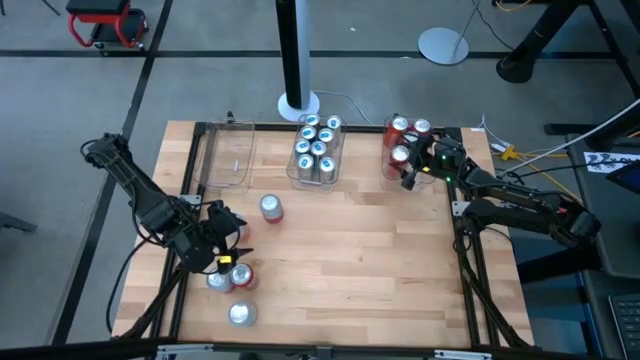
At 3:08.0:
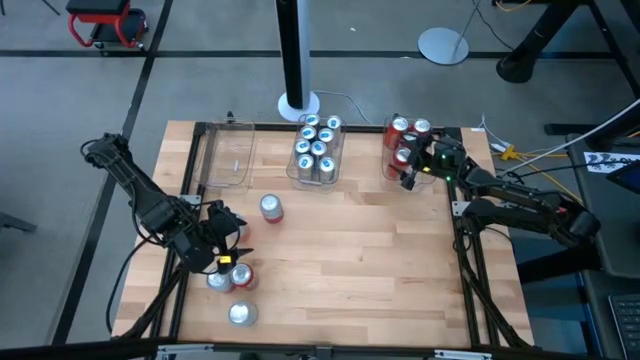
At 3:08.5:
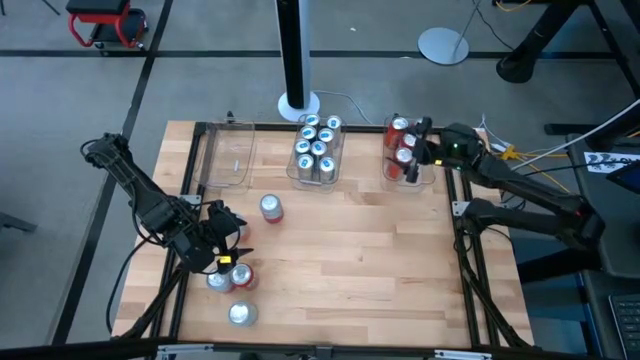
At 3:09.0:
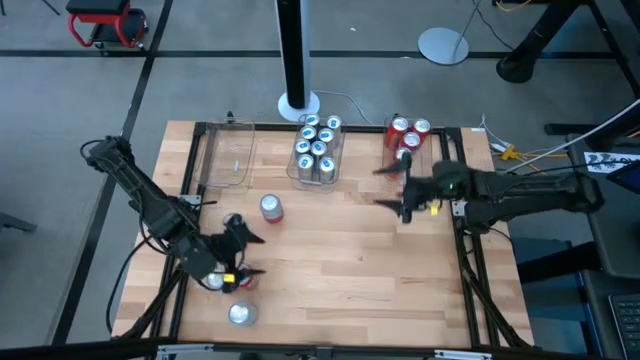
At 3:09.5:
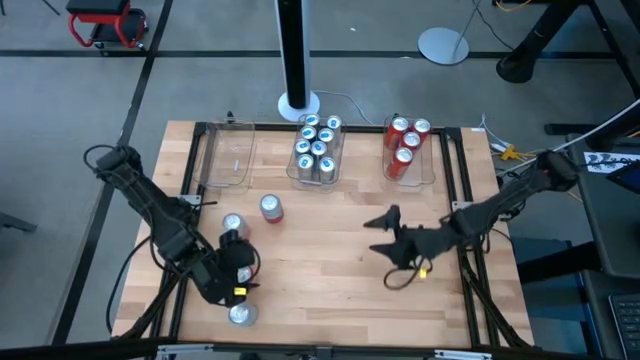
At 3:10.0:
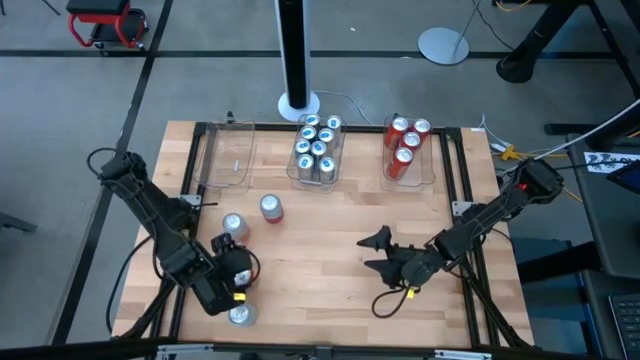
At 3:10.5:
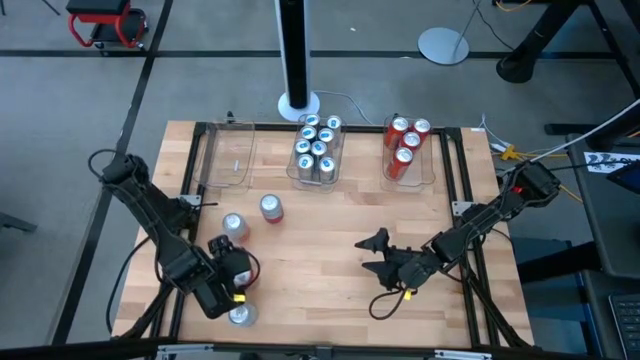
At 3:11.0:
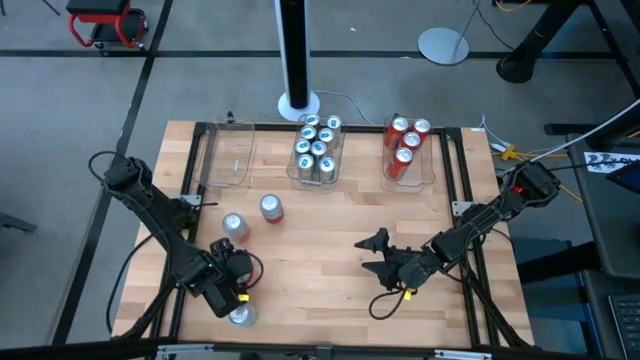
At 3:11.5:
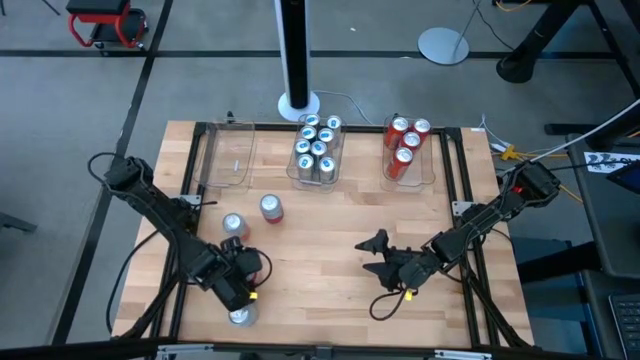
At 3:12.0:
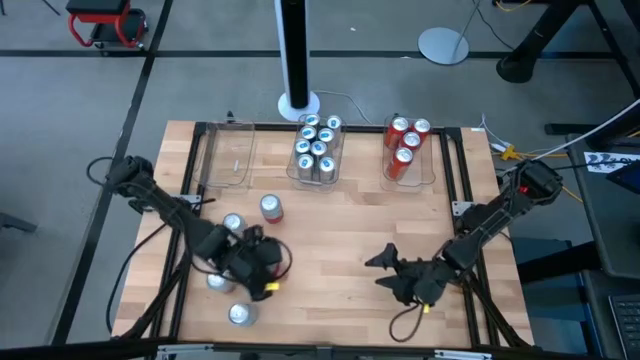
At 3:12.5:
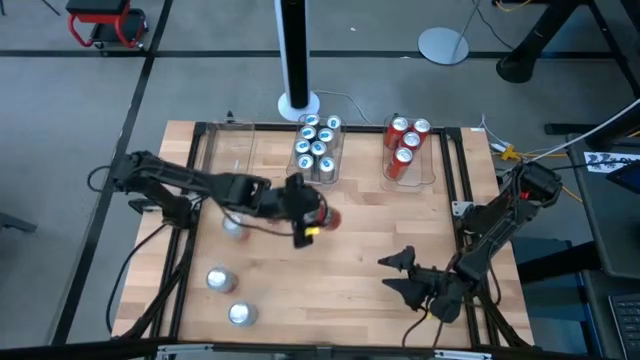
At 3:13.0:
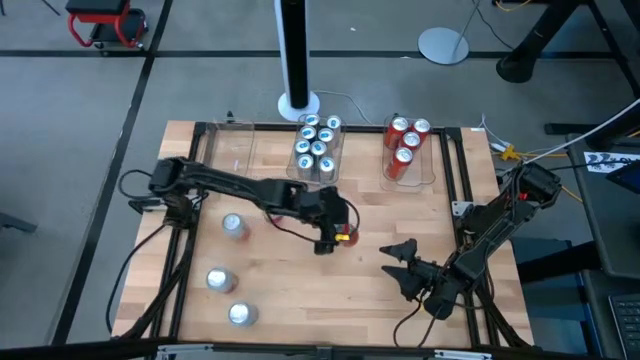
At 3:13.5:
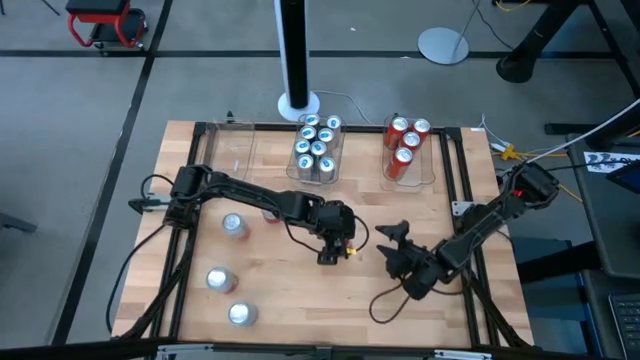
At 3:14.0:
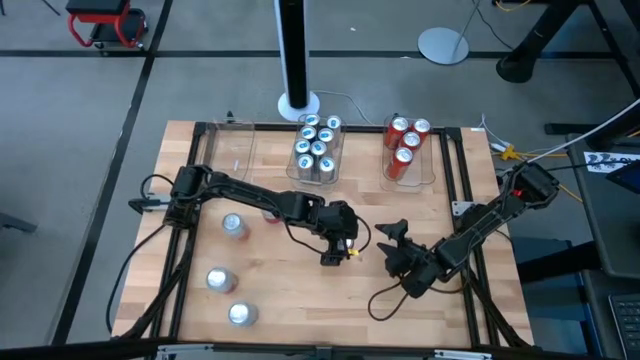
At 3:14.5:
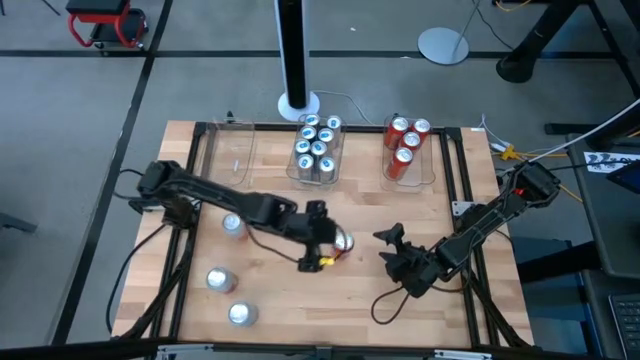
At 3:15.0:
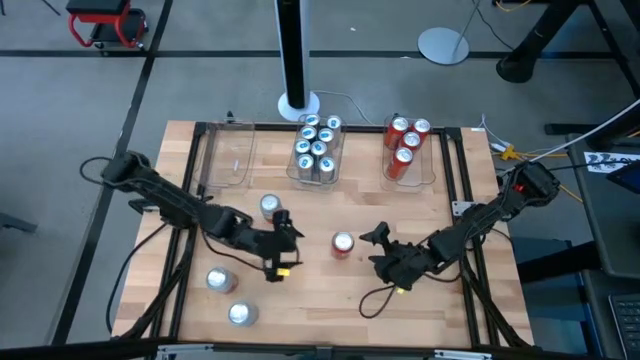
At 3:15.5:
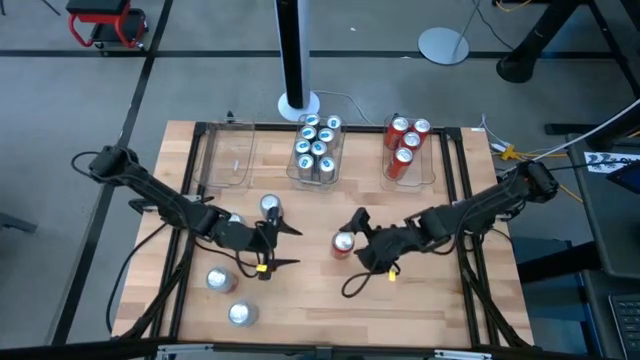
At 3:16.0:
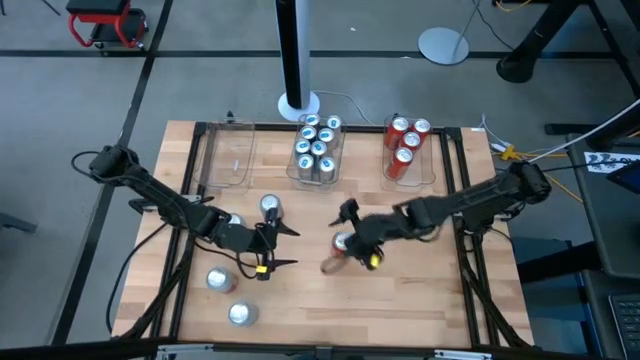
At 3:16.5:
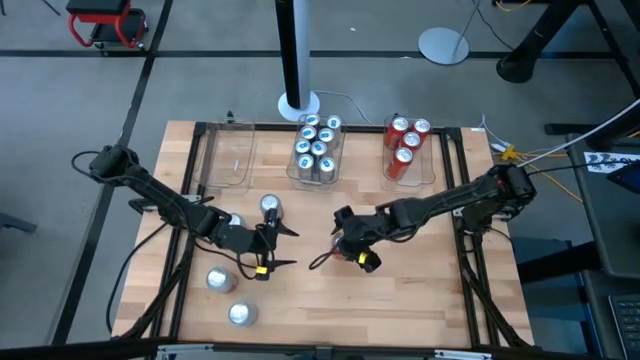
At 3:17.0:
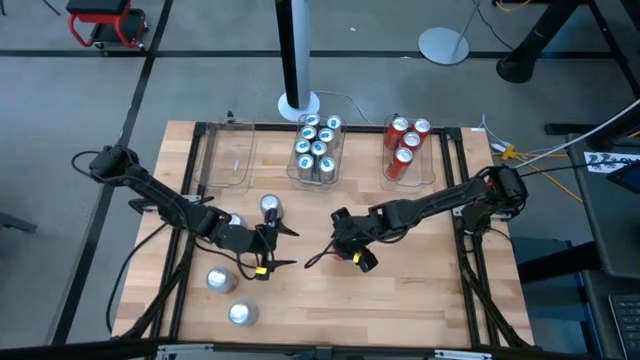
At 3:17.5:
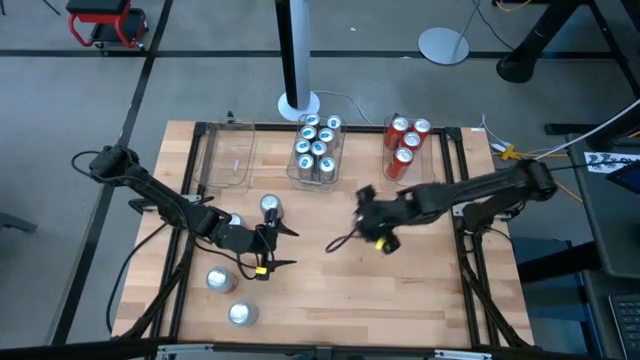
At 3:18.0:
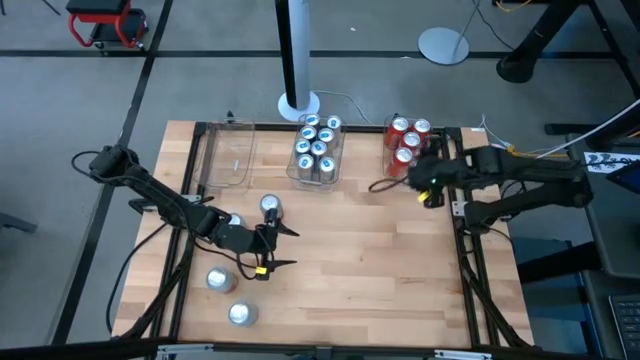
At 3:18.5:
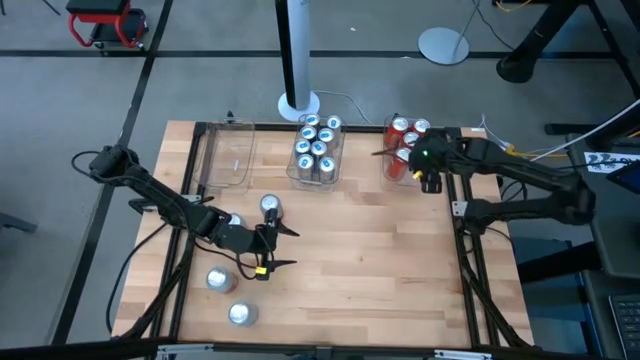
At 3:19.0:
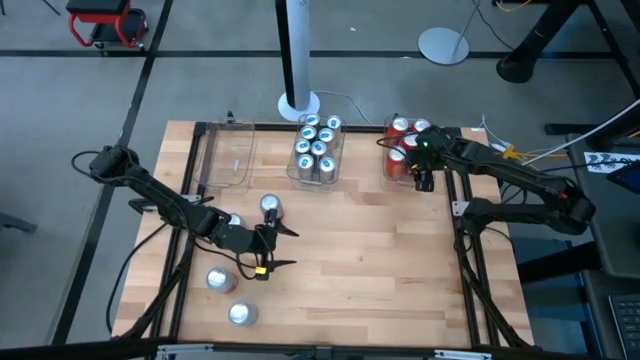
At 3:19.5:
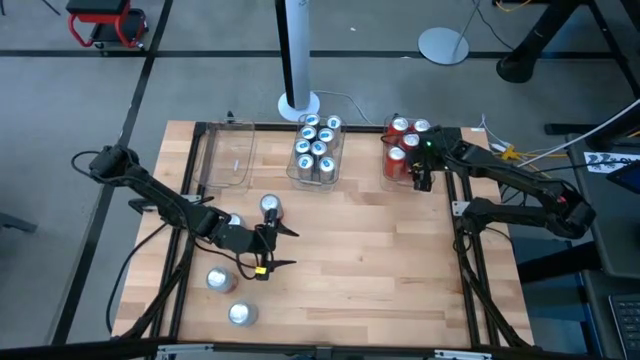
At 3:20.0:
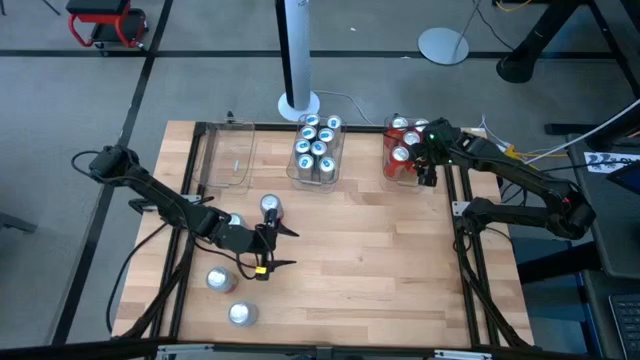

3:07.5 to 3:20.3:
Task: Sort soda cans
Put the orange soda can into the right transparent bin

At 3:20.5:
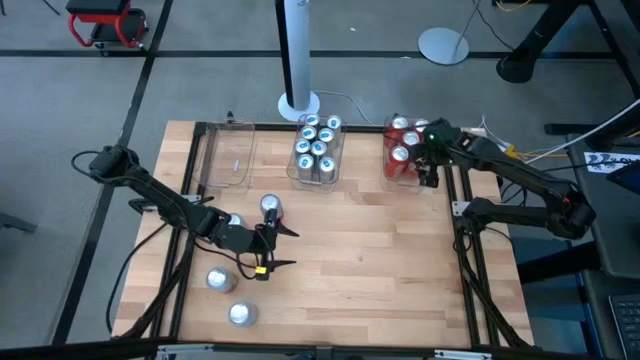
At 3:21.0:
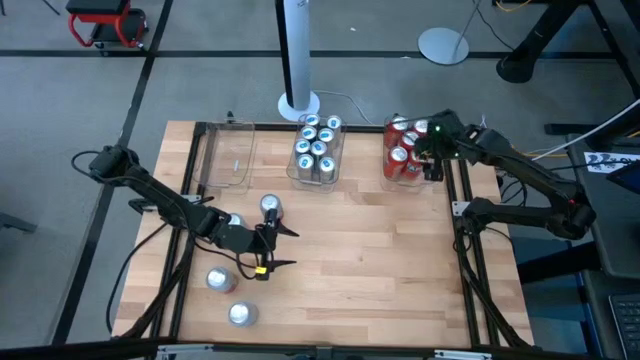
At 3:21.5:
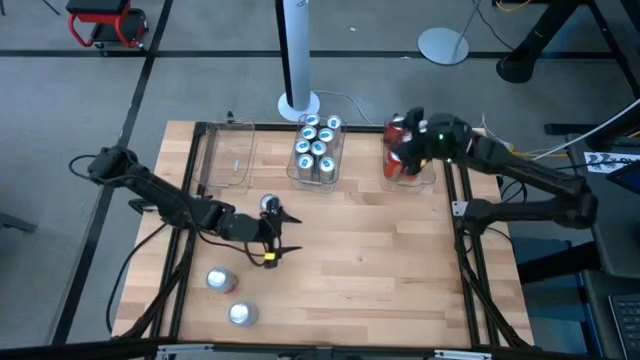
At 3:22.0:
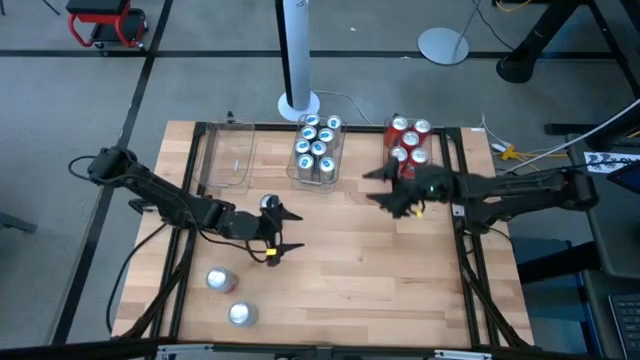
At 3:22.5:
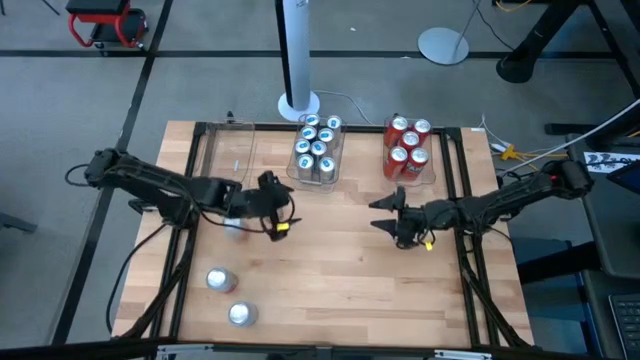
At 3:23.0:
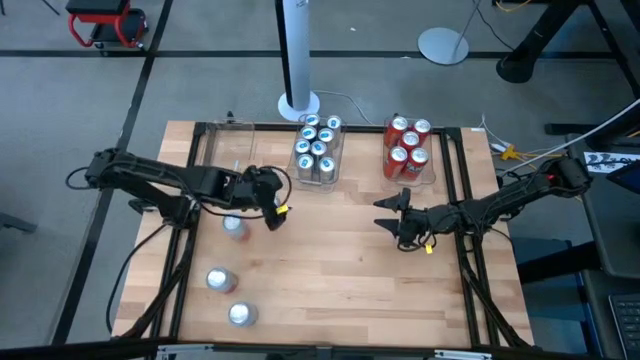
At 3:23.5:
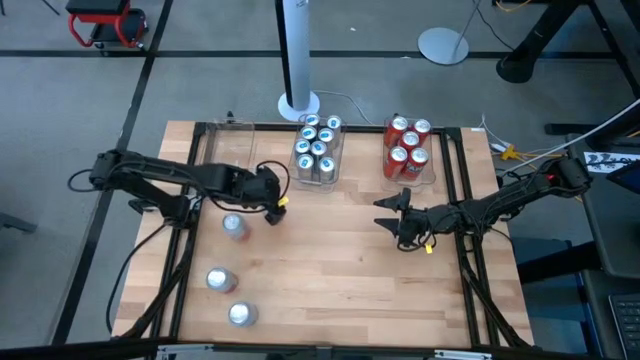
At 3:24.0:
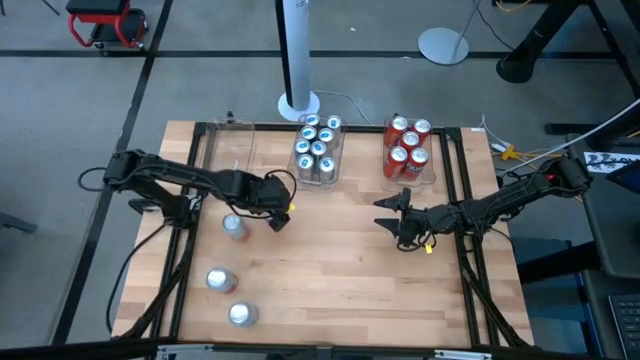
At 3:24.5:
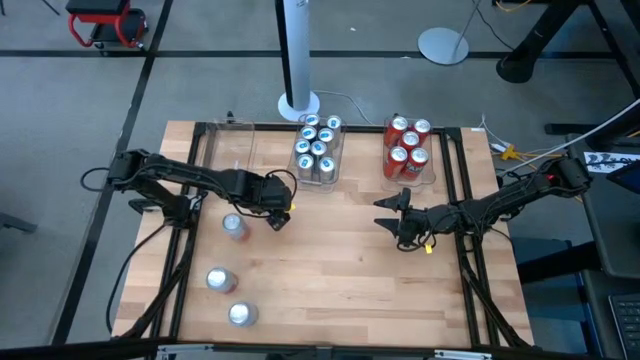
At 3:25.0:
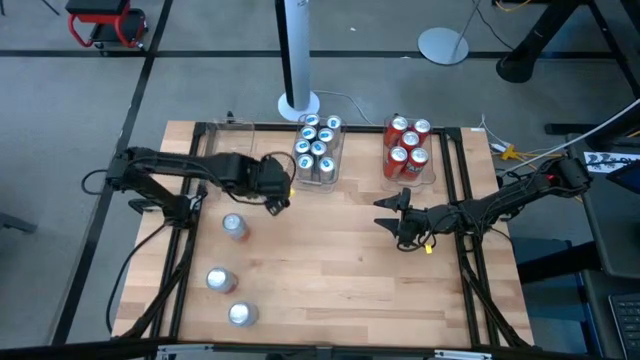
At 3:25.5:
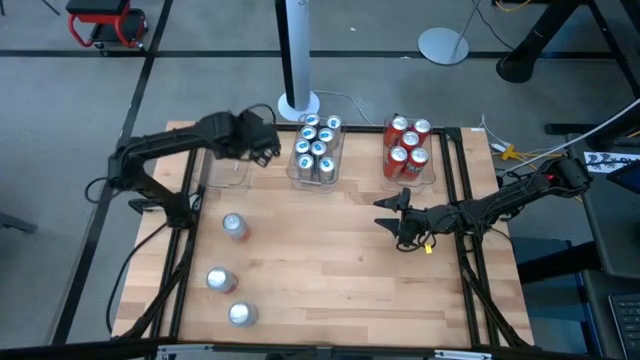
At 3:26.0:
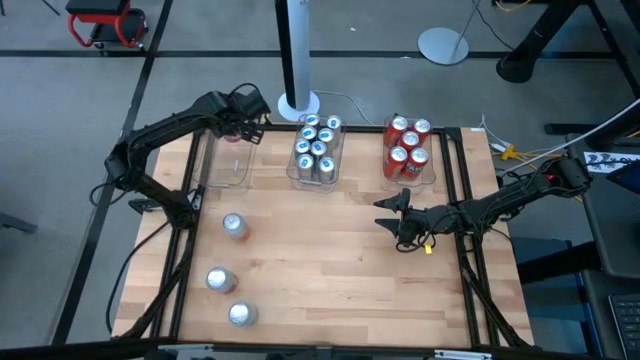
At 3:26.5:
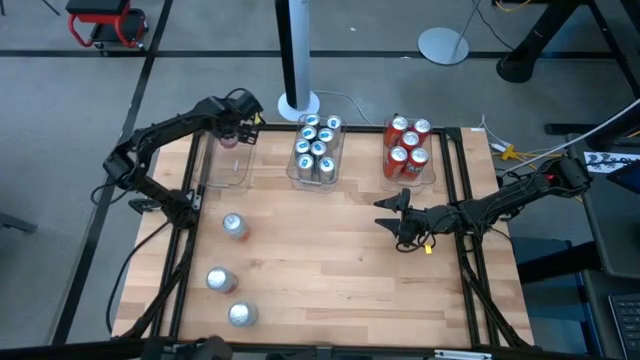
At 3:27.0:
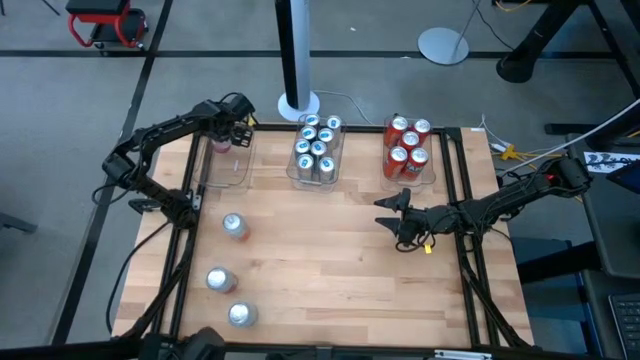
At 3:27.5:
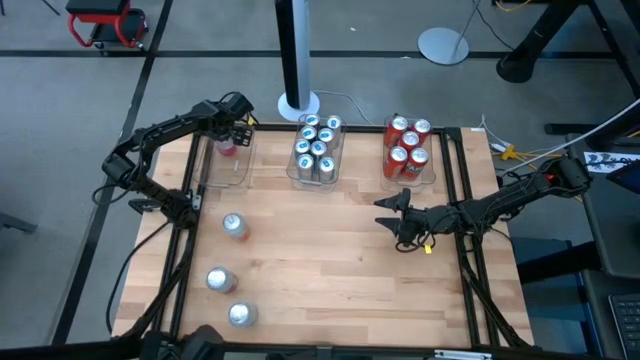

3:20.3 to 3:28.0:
Put the pink-white soda can into the left transparent bin

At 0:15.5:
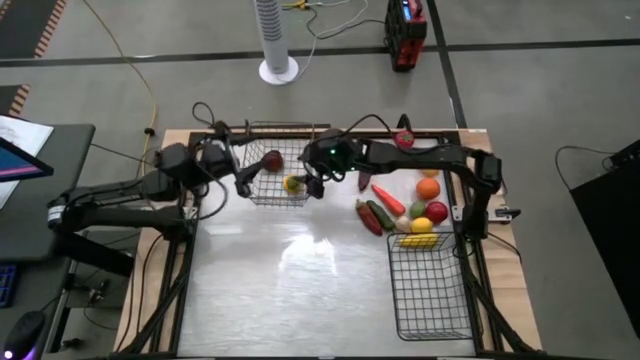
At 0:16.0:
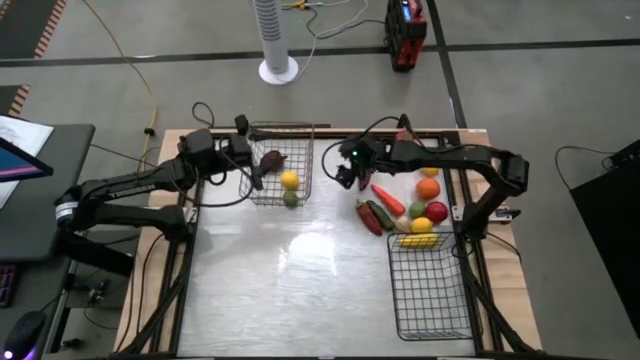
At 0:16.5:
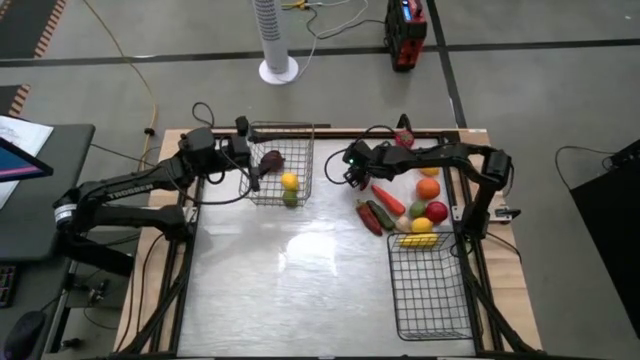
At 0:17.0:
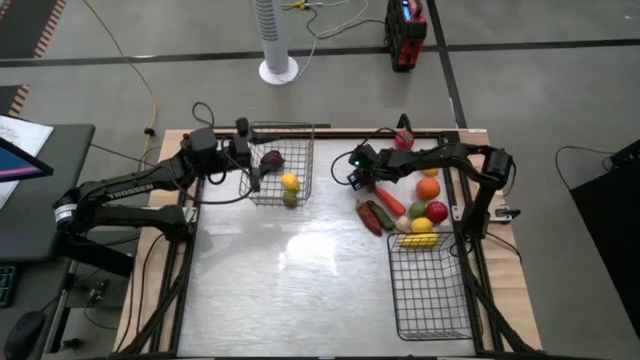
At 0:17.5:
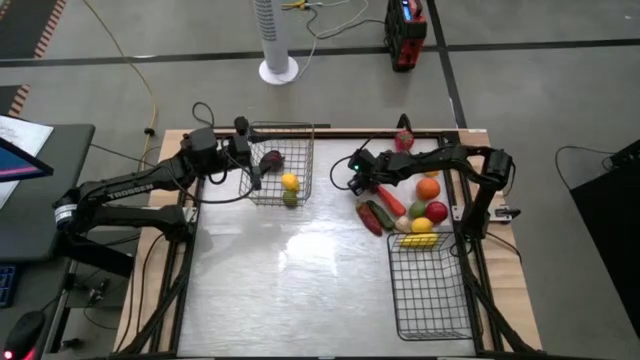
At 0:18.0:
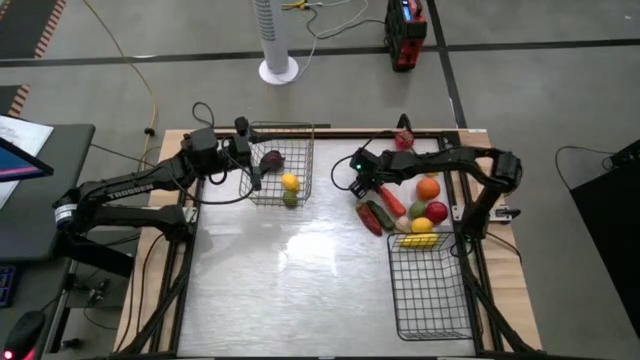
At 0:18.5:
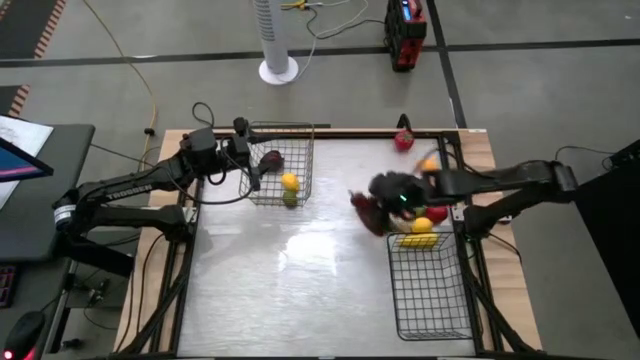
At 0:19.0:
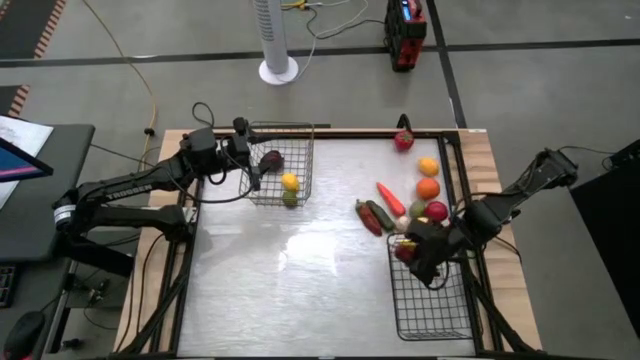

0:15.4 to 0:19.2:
Task: Sort produce into baskets
Put the top red bell pepper into the right wire basket
